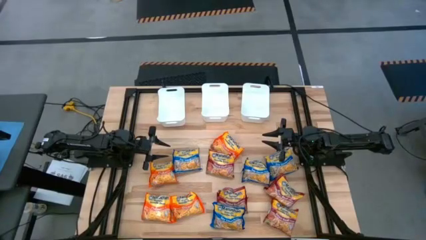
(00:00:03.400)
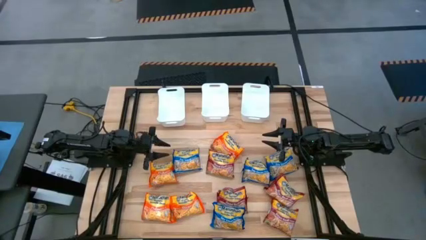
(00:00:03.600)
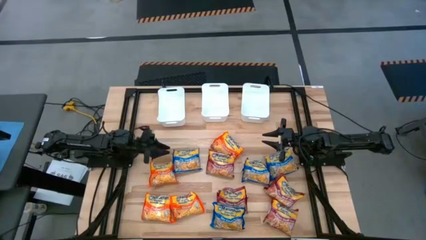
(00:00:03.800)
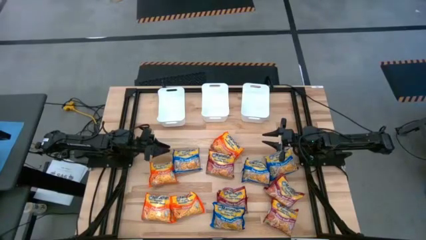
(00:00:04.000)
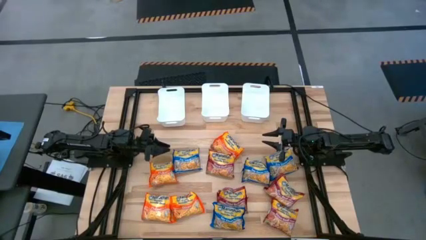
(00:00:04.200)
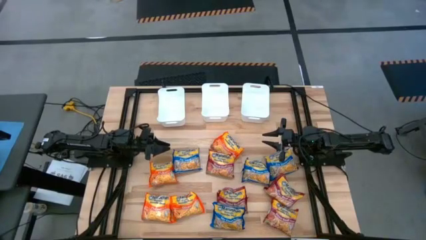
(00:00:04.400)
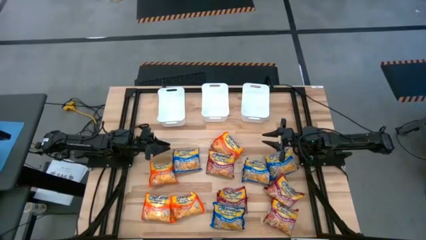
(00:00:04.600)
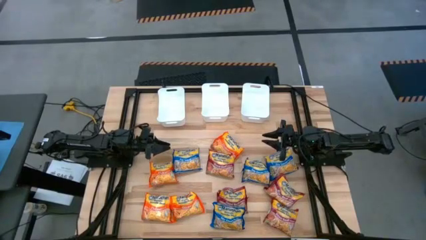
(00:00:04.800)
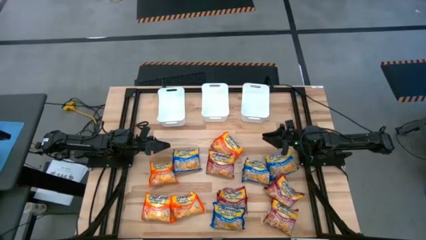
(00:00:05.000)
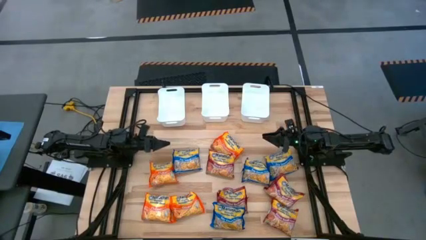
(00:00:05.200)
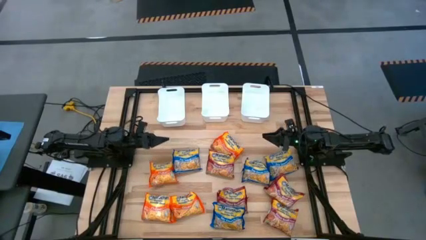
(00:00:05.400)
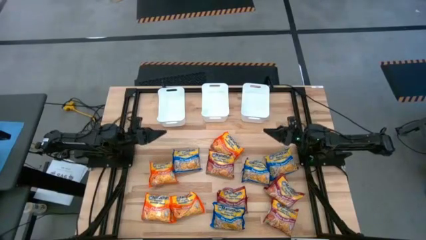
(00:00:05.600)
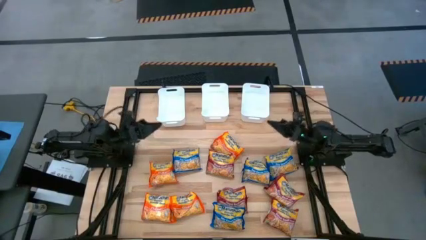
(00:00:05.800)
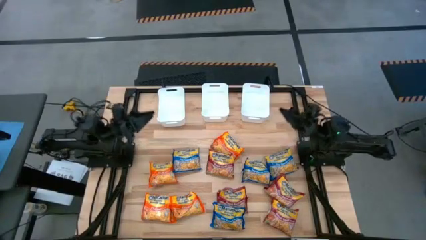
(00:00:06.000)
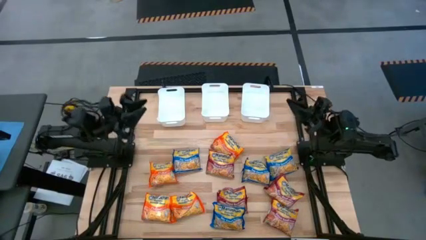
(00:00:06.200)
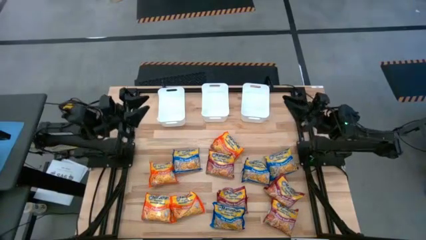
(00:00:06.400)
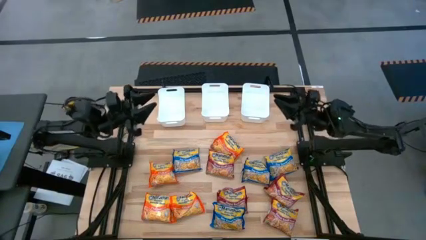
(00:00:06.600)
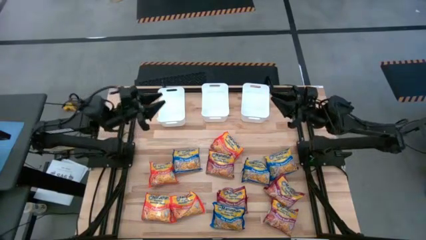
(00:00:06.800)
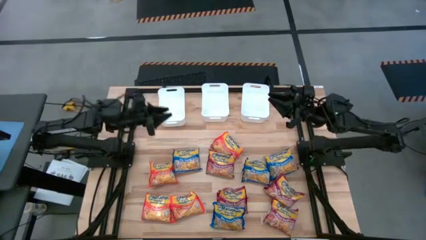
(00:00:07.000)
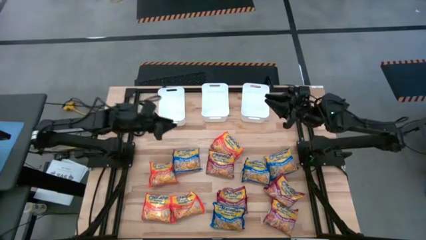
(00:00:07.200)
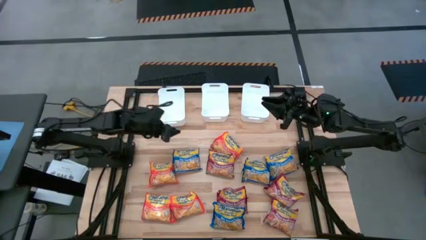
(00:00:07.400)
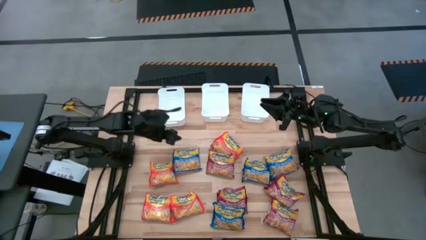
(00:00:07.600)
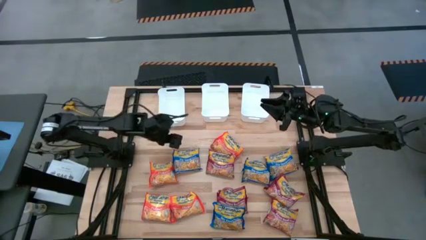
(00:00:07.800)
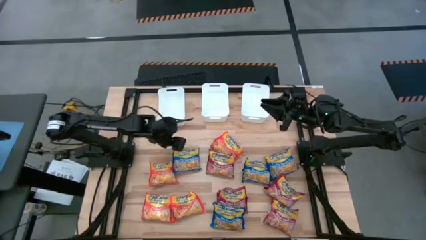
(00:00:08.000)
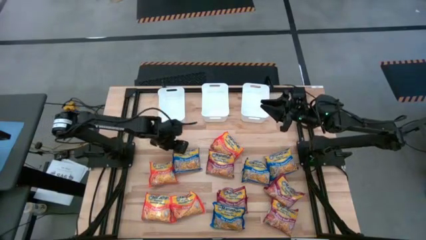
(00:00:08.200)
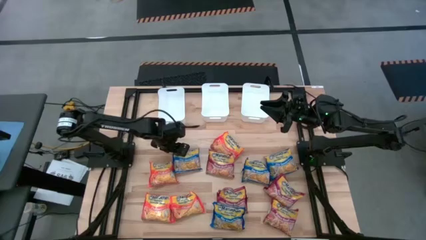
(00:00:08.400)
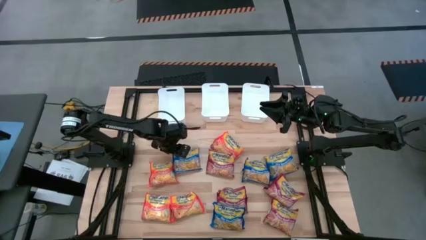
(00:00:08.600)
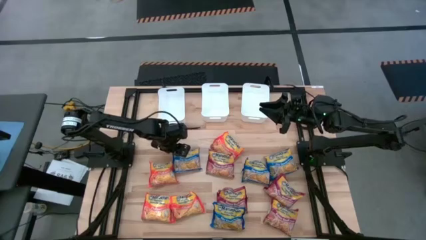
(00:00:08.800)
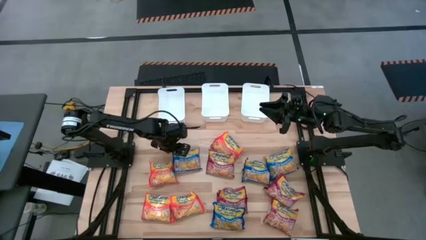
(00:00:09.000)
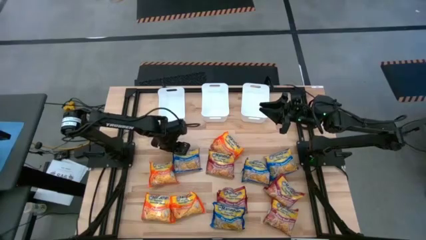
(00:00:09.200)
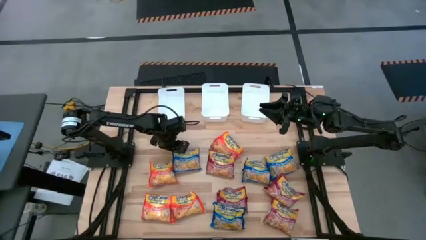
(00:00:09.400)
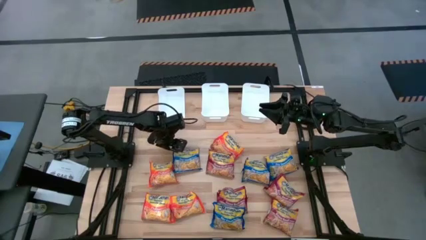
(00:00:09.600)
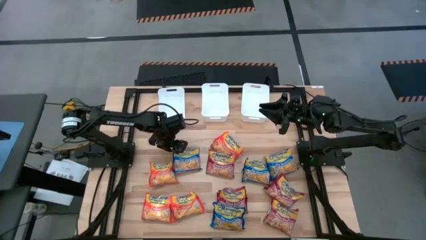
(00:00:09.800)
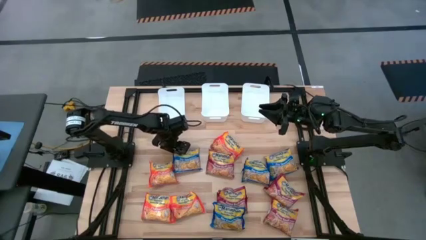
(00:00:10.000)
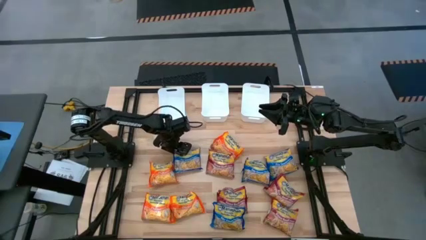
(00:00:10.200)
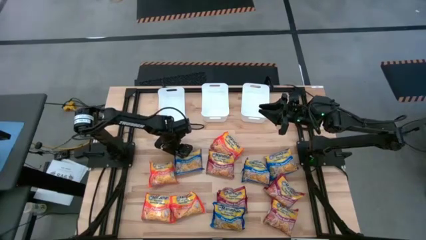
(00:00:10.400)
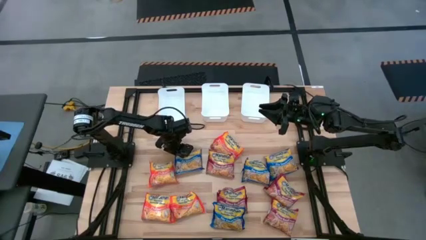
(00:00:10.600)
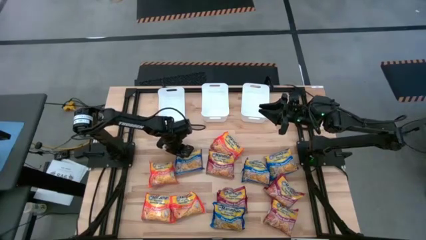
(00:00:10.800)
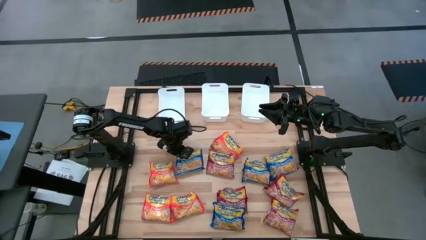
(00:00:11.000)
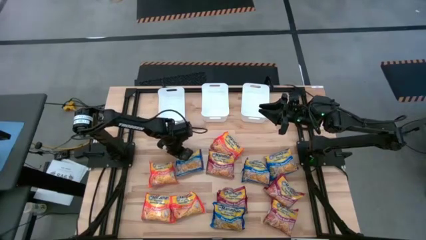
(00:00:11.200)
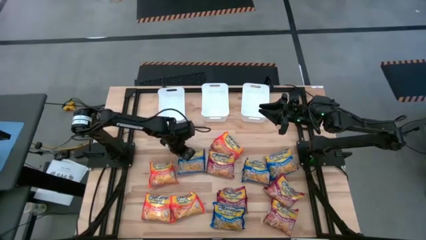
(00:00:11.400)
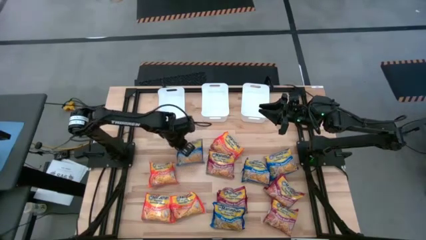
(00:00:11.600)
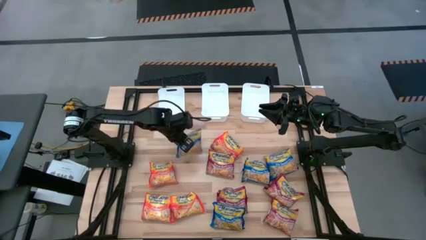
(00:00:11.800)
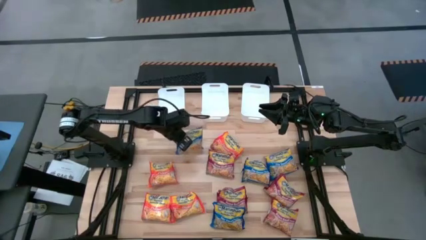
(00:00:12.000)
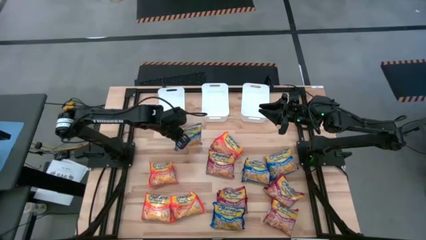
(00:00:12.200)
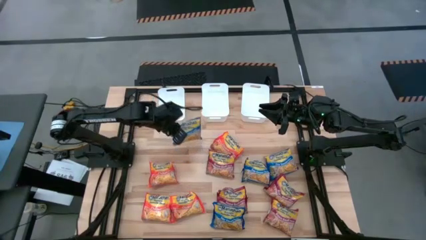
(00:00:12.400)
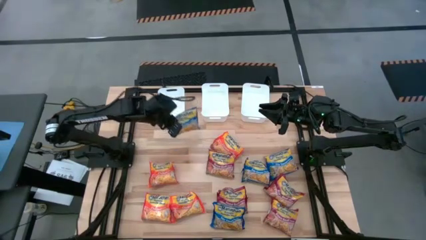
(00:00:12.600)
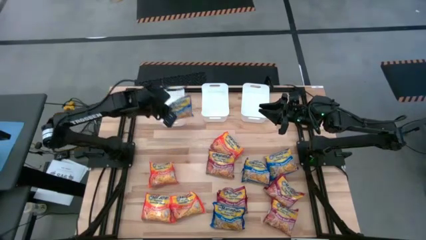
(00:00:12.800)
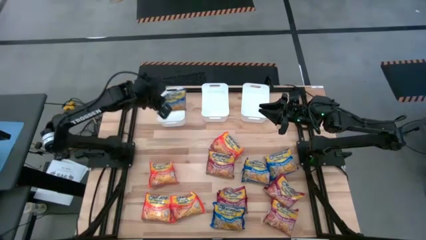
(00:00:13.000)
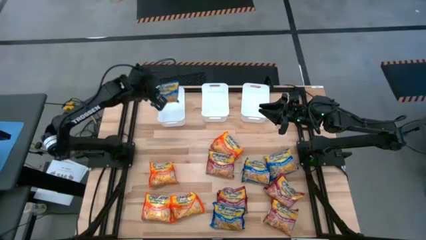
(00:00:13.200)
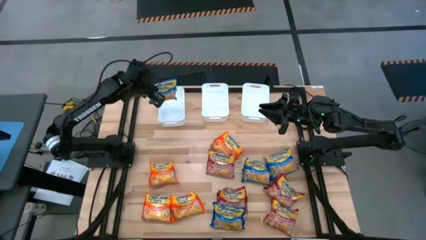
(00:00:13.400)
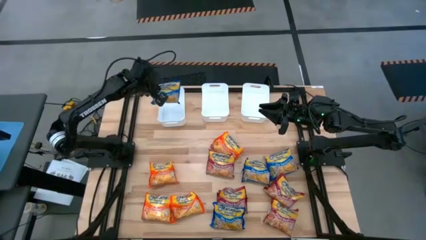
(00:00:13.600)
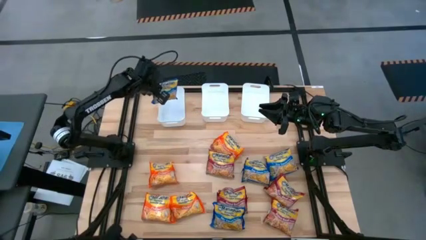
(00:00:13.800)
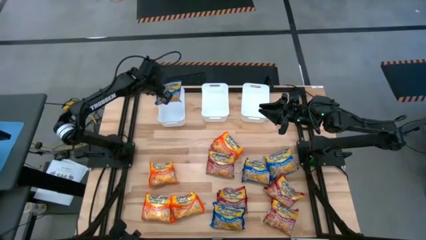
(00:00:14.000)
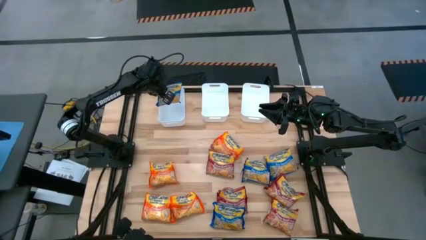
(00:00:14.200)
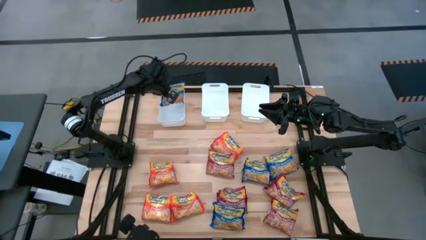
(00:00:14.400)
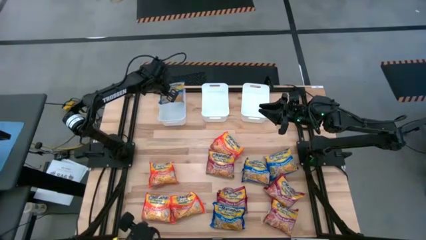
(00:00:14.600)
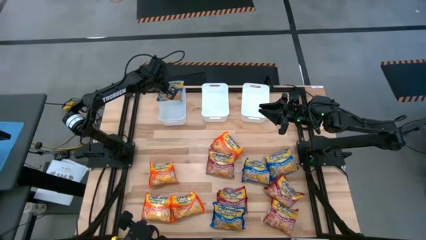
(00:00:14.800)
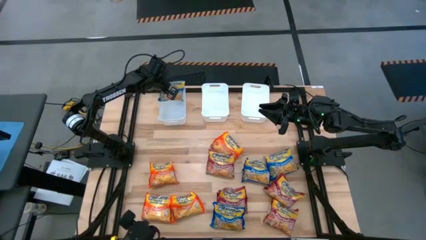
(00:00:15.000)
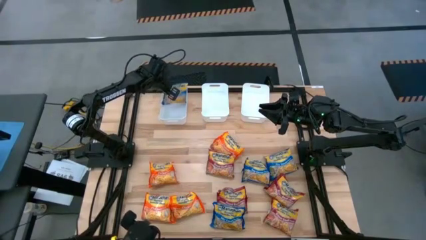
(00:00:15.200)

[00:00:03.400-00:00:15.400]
Task: Sort Maruchan noodles
Put the blue noodle pack into the left white bin
